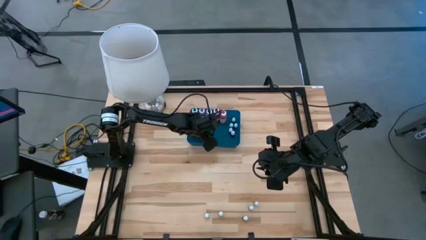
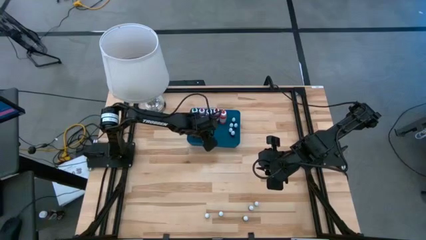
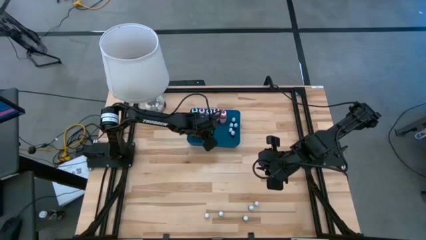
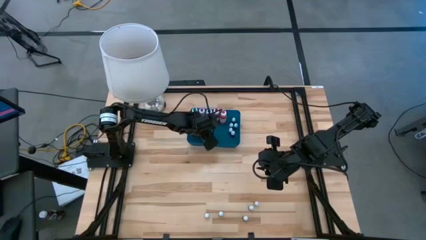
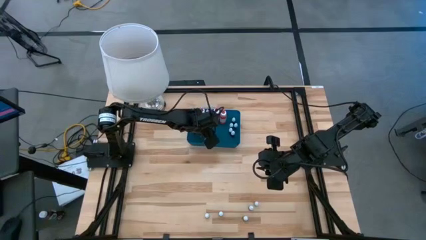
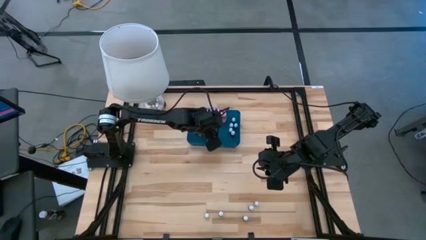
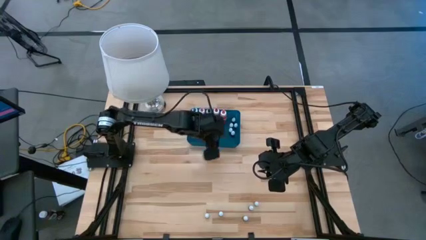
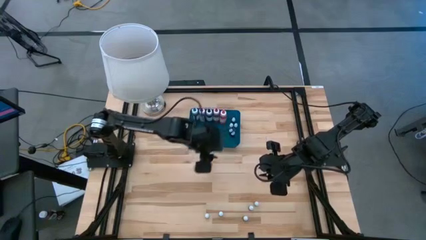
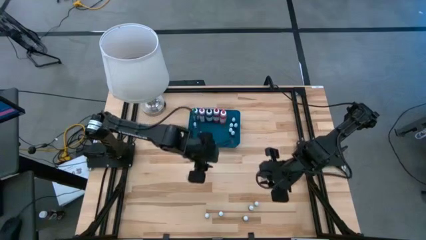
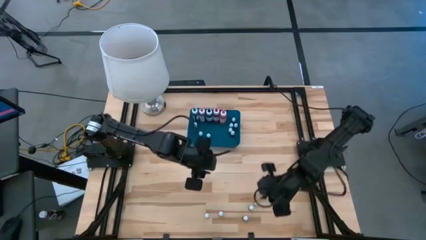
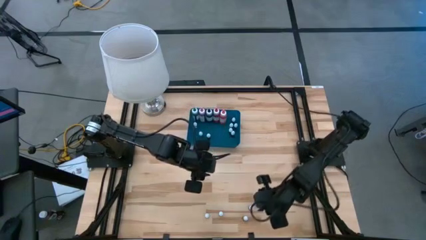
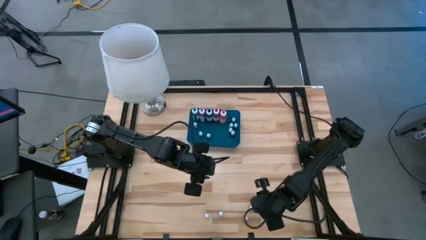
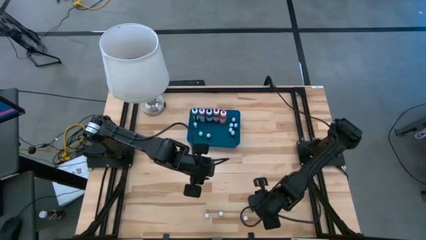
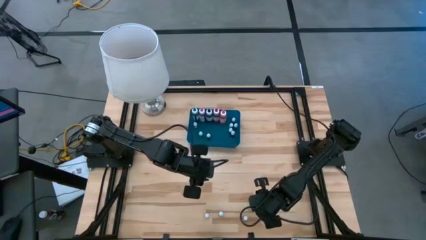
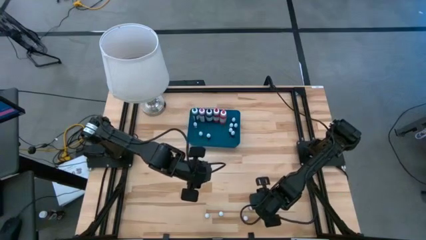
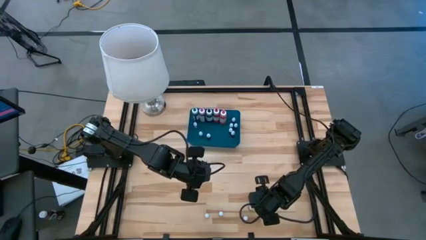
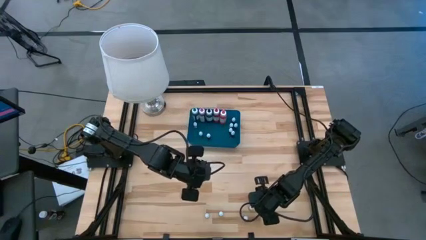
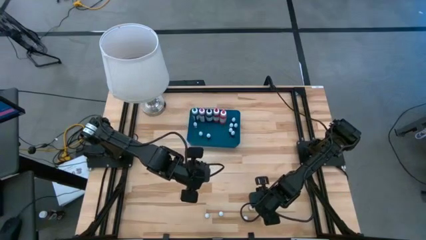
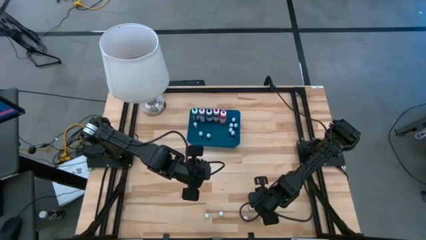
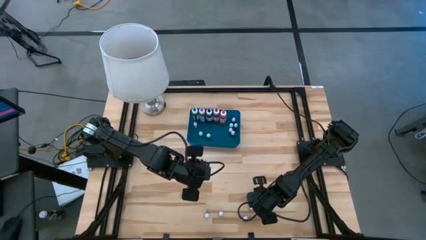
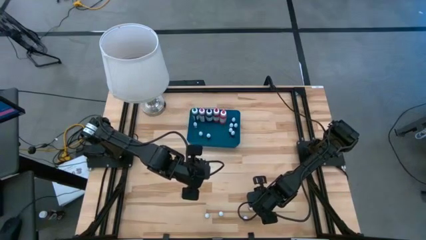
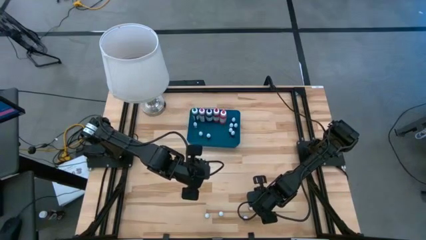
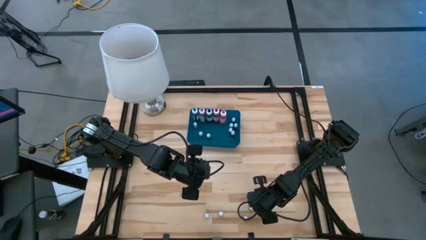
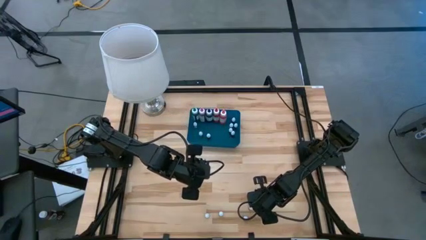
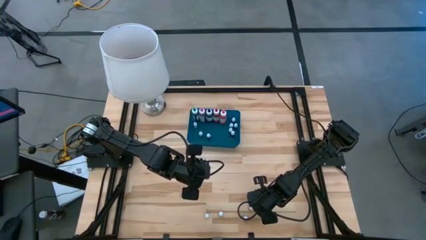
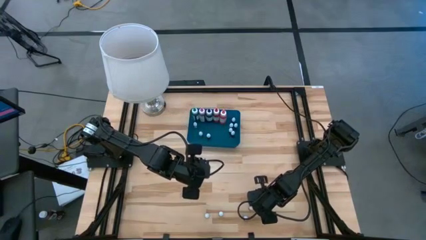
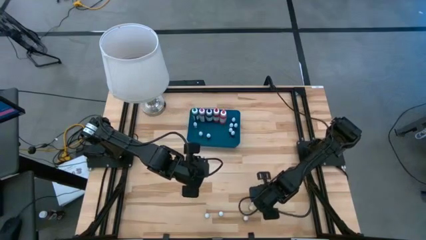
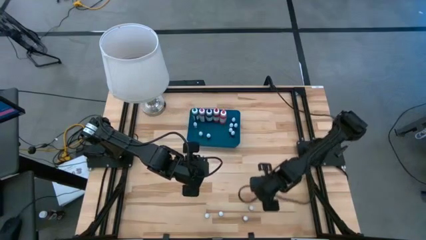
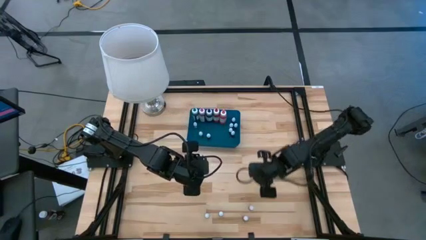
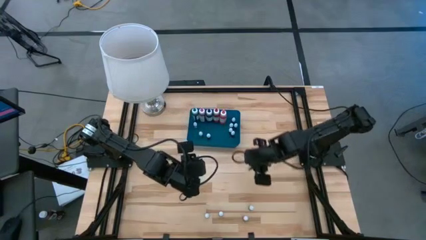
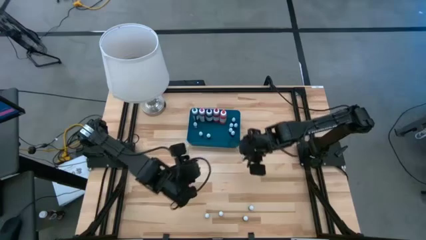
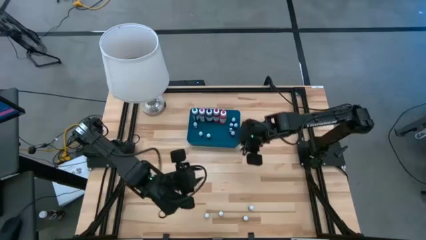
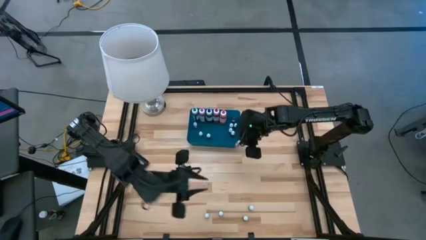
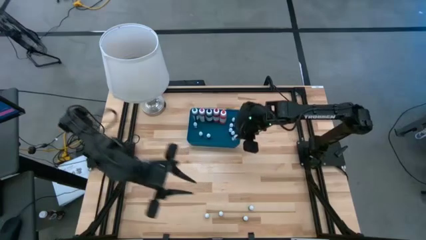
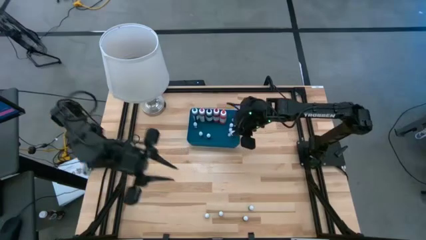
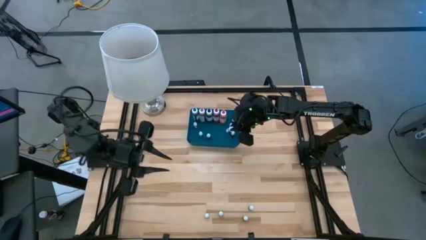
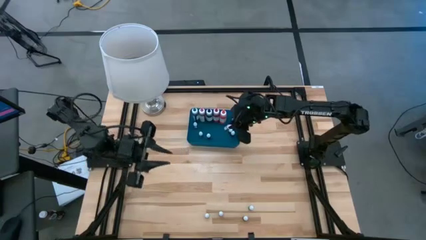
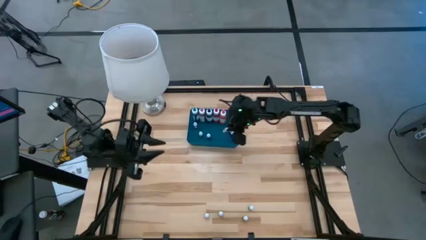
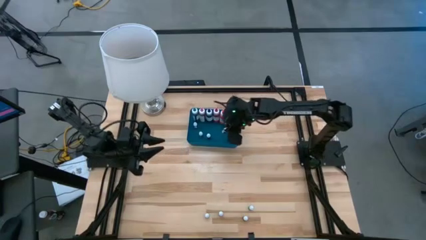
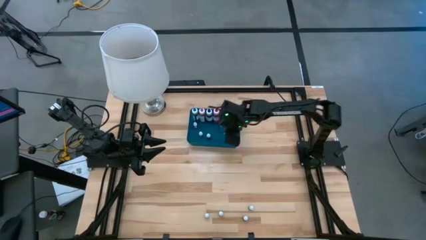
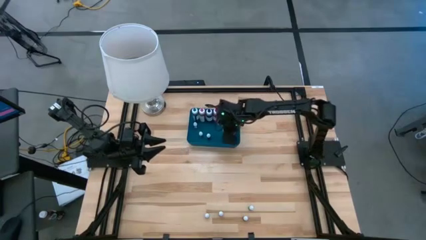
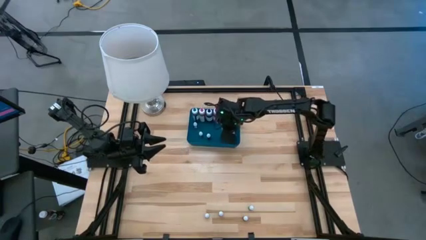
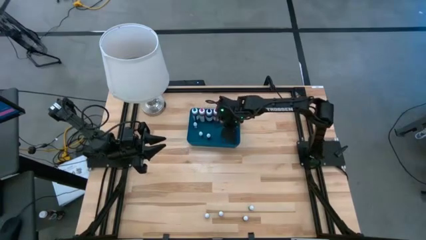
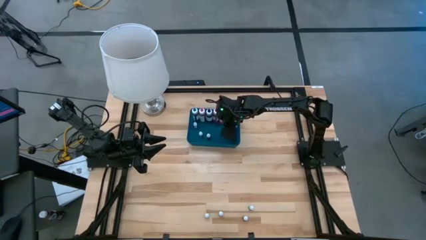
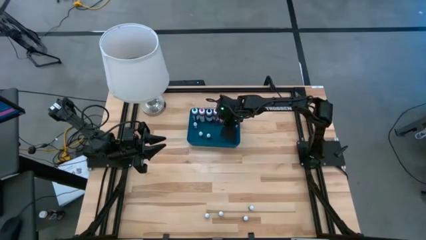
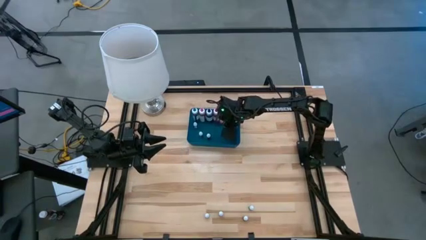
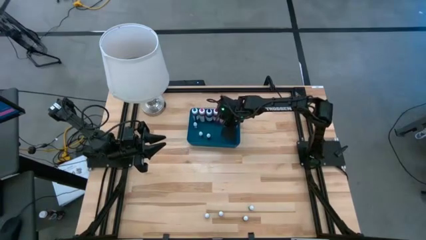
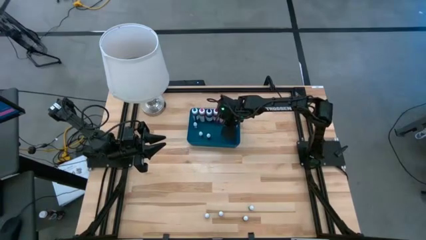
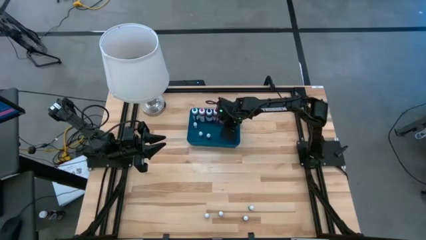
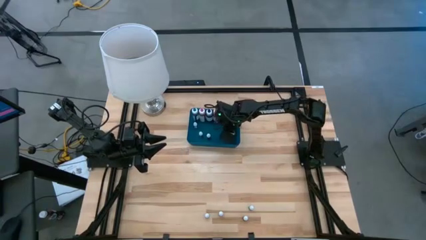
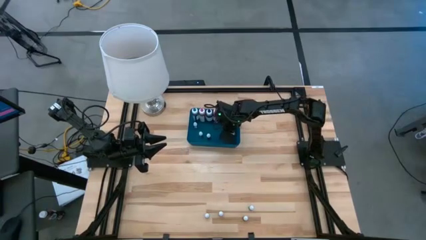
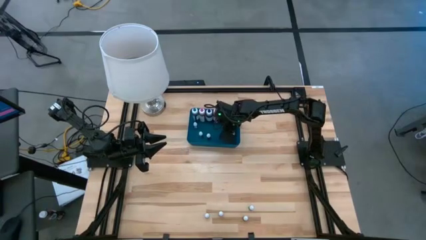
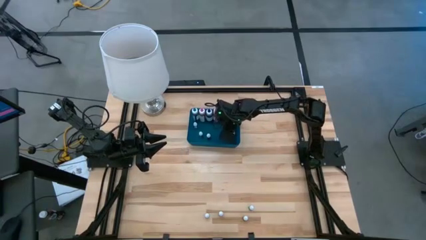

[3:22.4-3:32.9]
Task: Pick & Place food coloring
Put the small red food coloring bottle into the bin

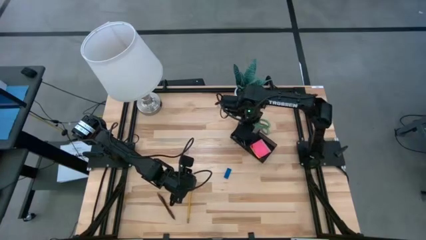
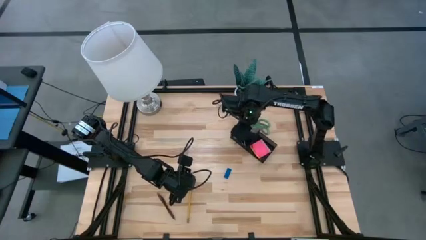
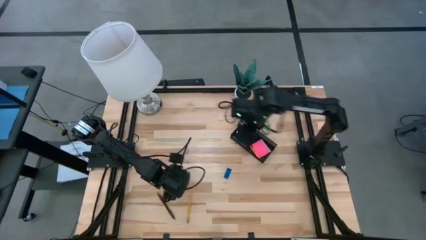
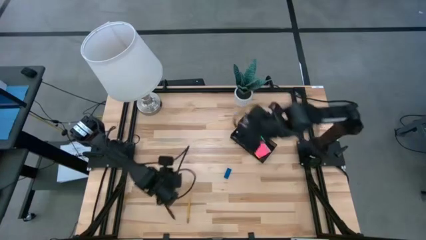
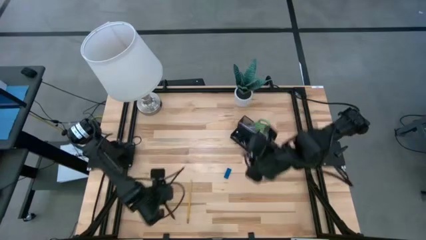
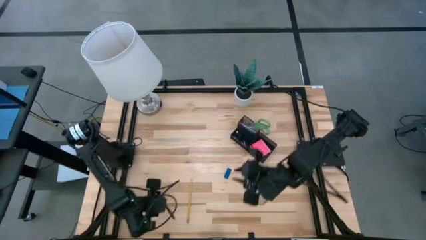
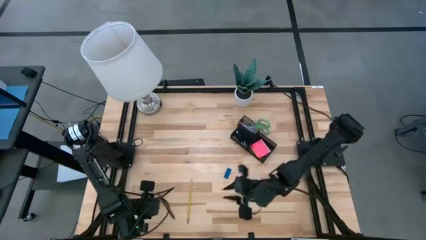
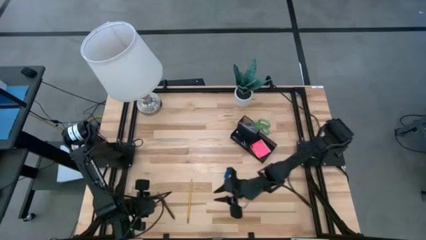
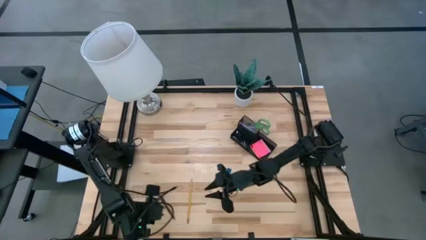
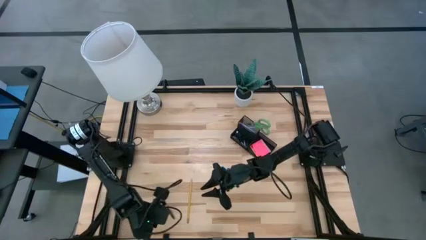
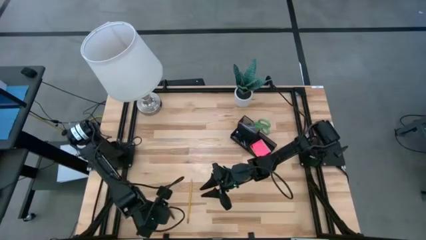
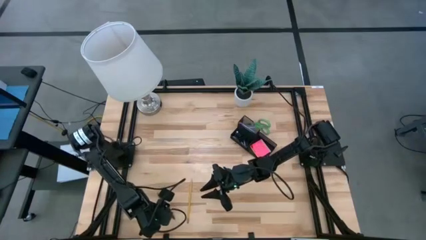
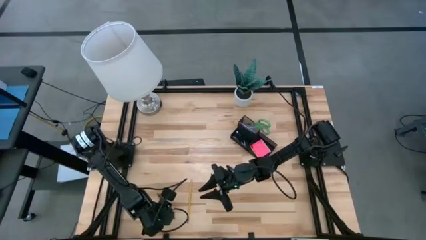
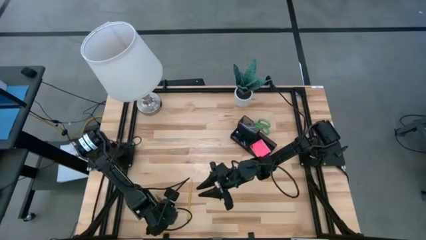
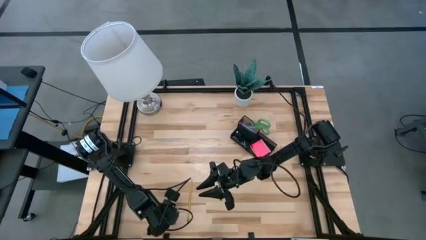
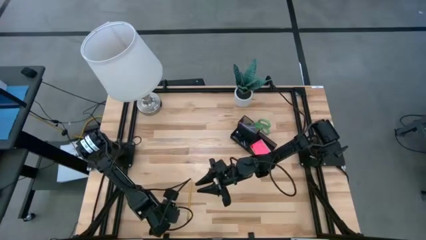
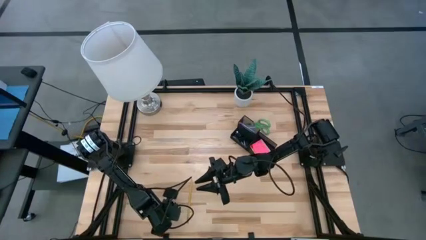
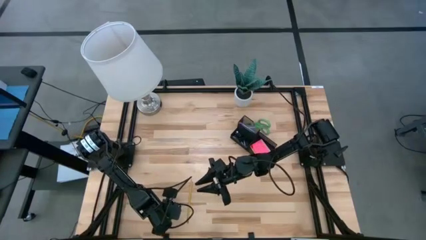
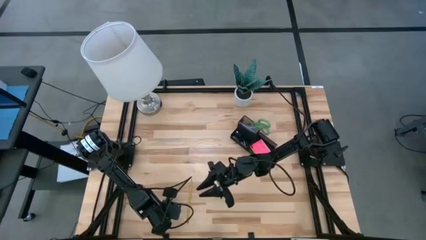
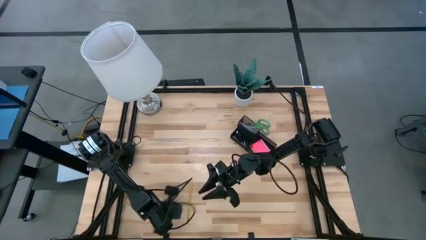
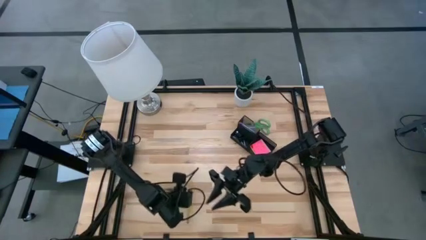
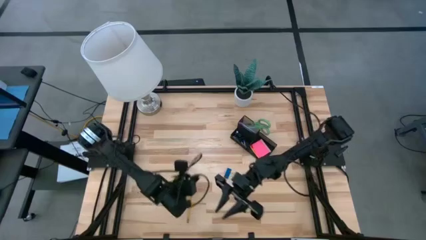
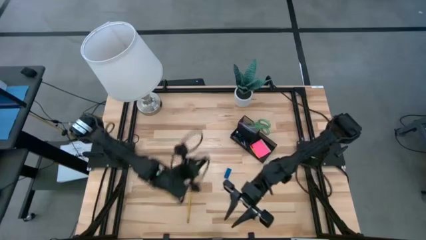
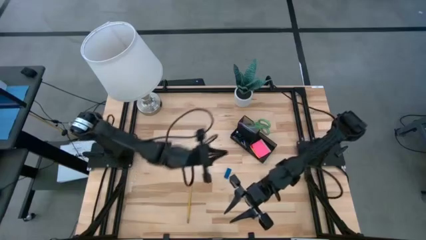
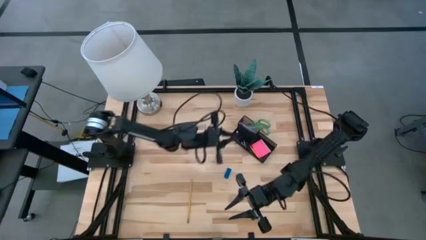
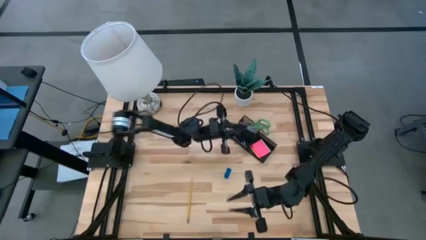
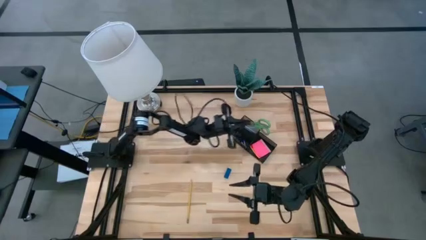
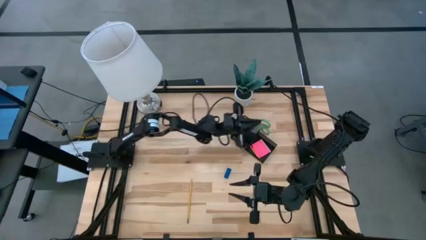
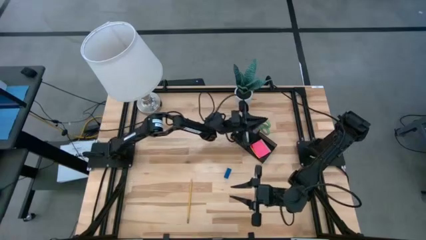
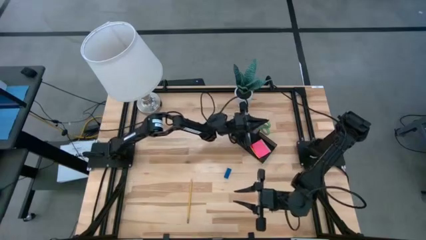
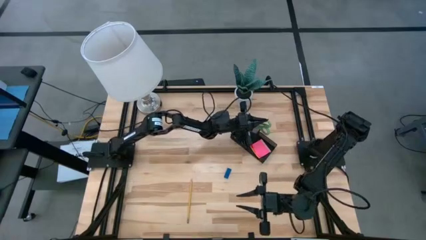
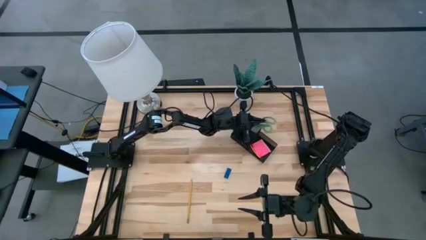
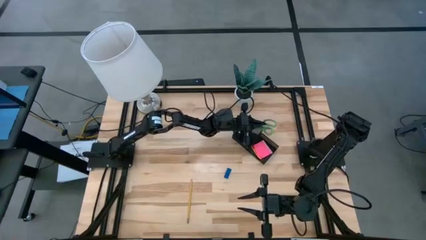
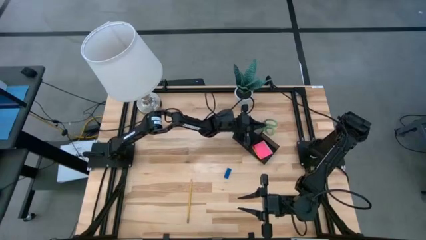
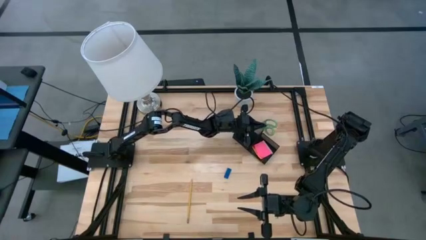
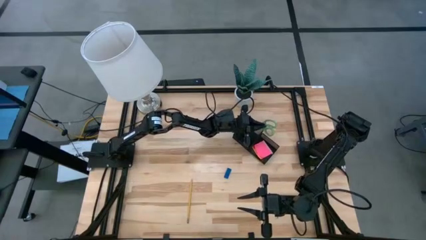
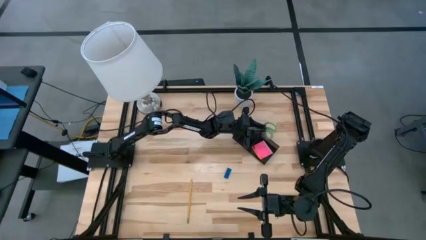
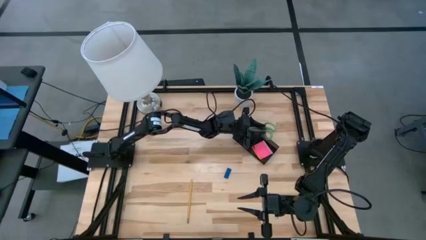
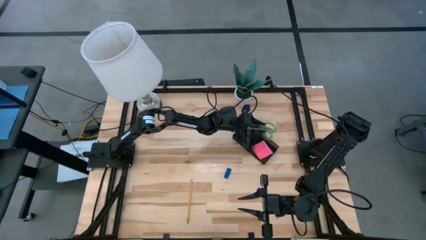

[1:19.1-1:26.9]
Task: Pick and place office supplies into organizer
Put the brown pen into the desk organizer
